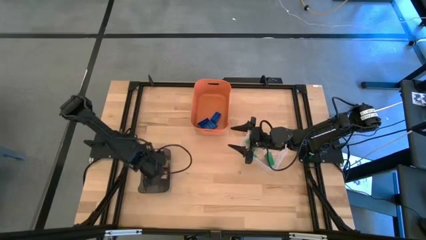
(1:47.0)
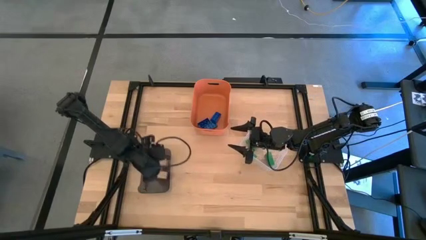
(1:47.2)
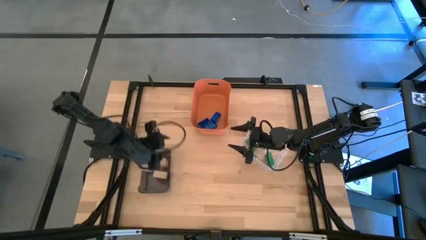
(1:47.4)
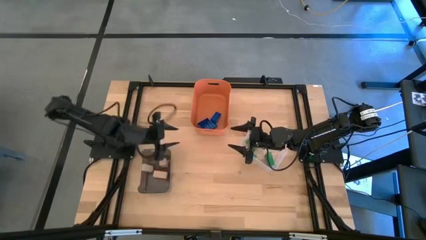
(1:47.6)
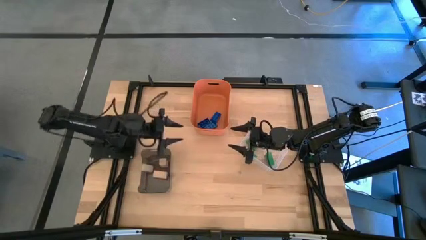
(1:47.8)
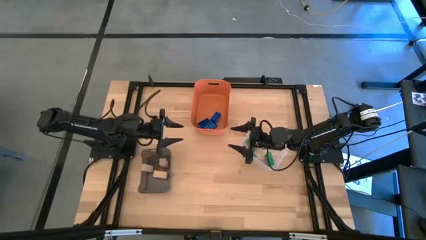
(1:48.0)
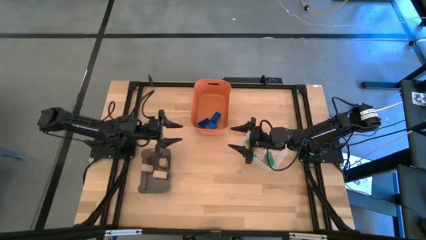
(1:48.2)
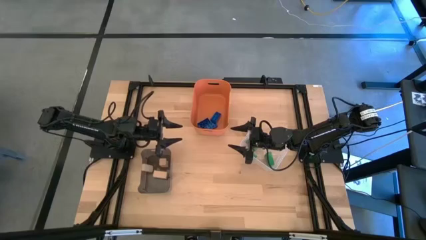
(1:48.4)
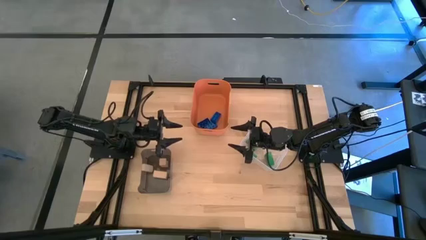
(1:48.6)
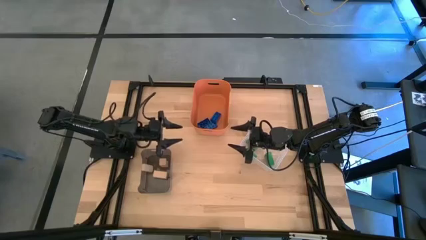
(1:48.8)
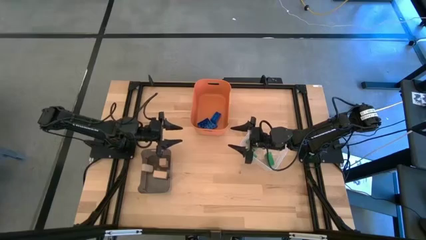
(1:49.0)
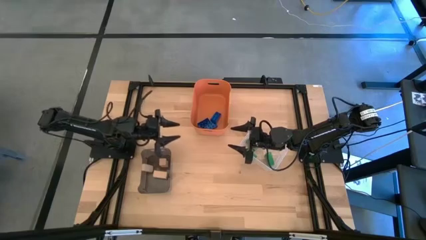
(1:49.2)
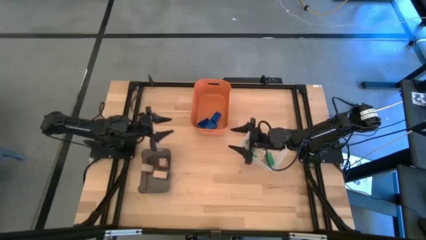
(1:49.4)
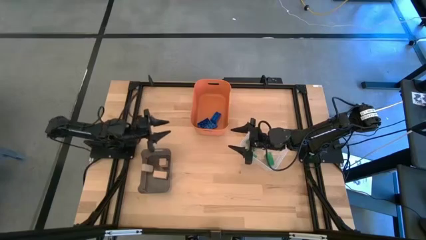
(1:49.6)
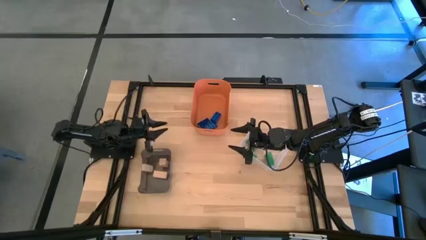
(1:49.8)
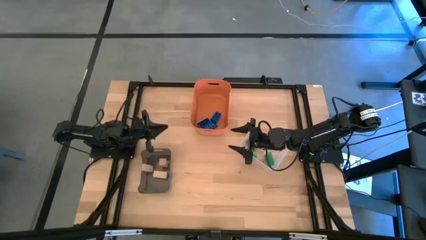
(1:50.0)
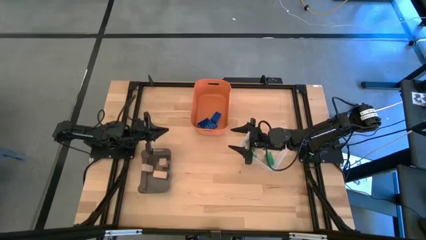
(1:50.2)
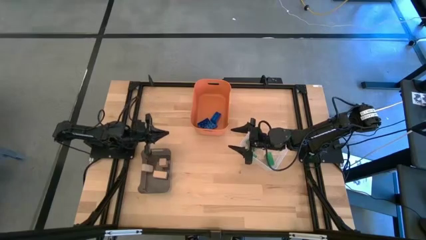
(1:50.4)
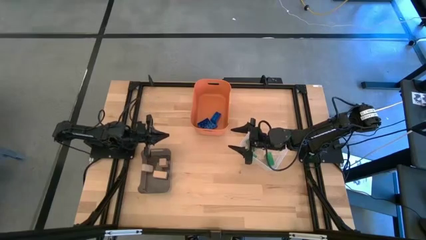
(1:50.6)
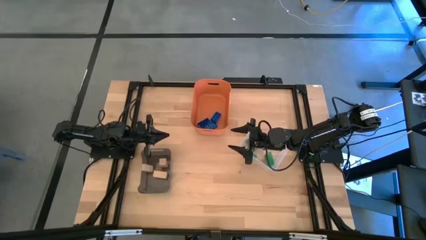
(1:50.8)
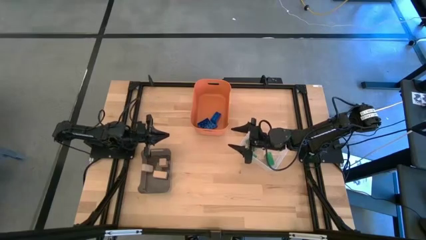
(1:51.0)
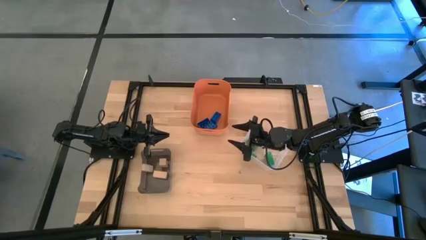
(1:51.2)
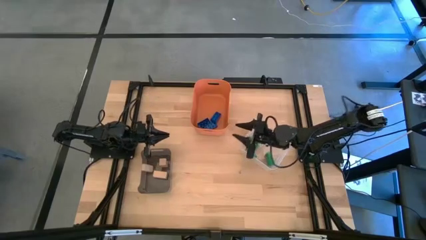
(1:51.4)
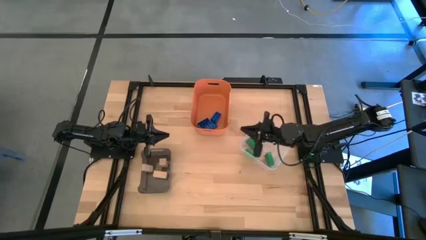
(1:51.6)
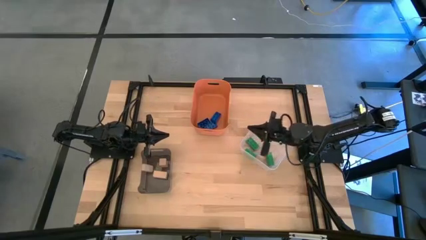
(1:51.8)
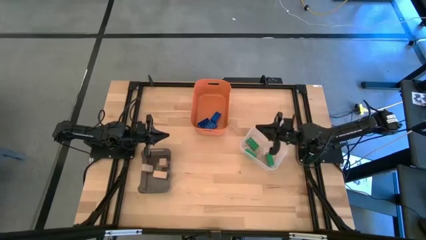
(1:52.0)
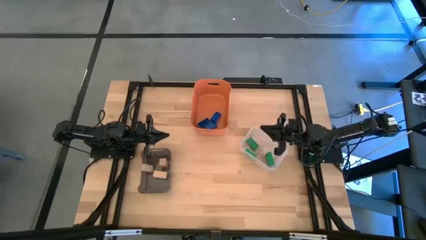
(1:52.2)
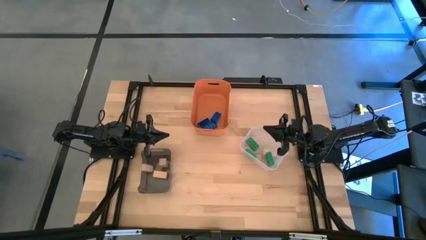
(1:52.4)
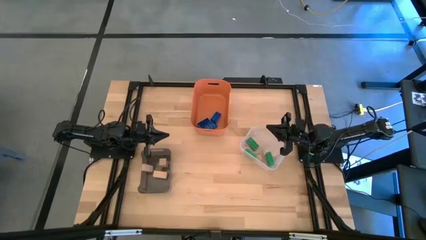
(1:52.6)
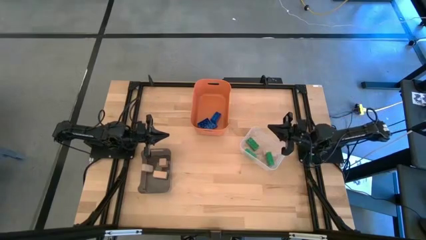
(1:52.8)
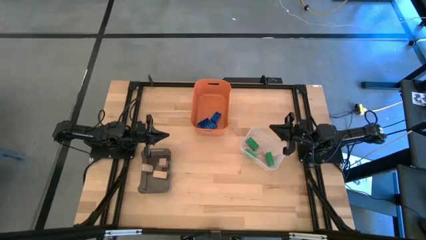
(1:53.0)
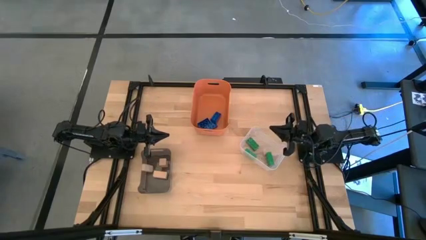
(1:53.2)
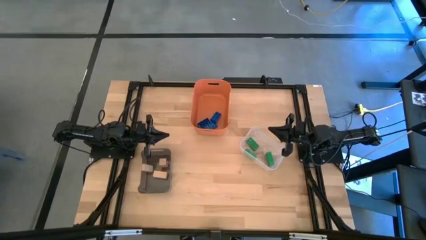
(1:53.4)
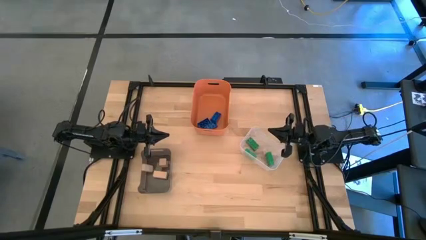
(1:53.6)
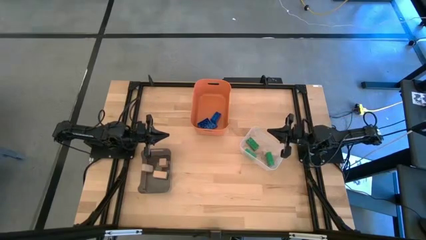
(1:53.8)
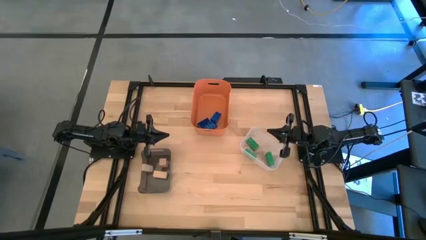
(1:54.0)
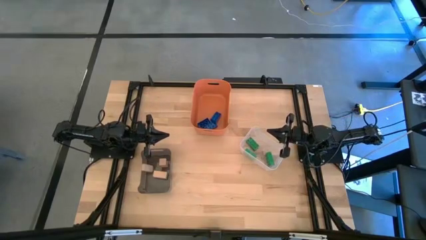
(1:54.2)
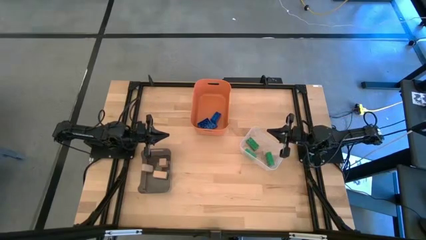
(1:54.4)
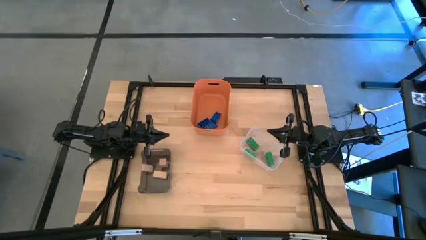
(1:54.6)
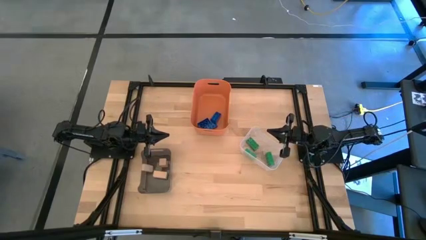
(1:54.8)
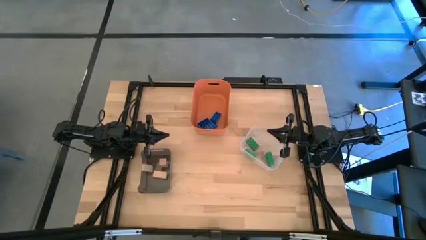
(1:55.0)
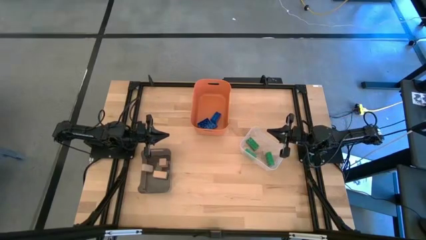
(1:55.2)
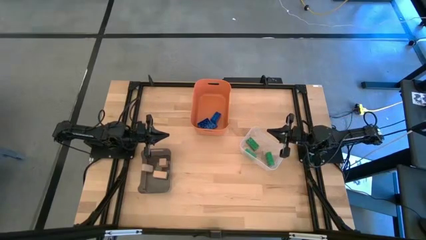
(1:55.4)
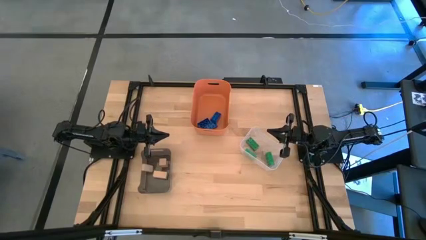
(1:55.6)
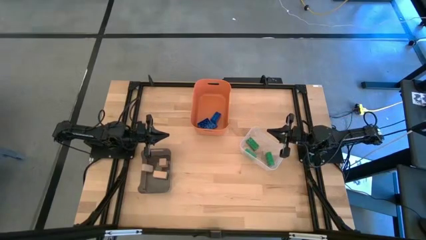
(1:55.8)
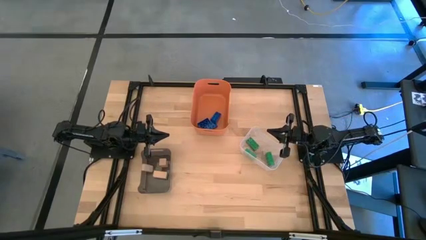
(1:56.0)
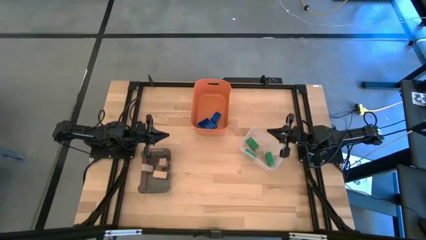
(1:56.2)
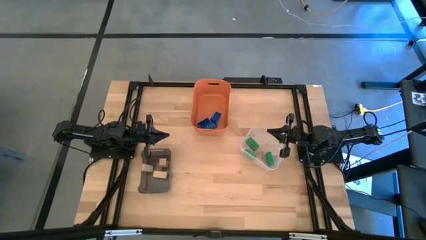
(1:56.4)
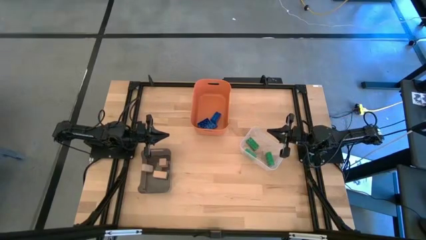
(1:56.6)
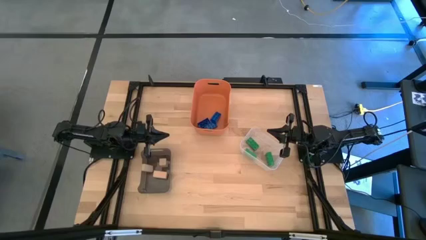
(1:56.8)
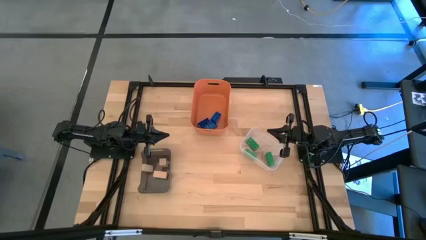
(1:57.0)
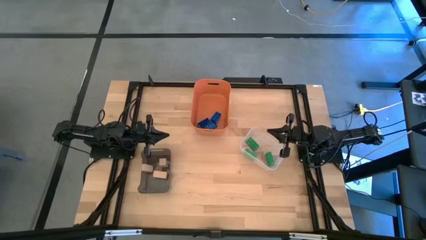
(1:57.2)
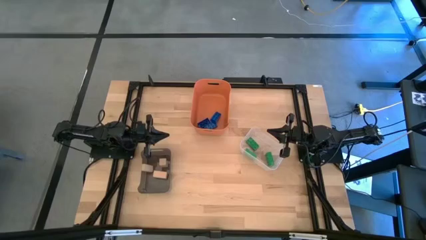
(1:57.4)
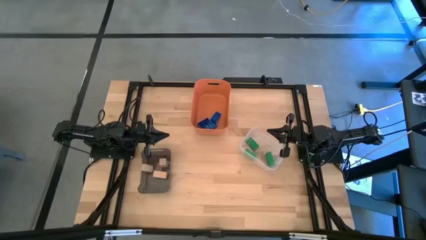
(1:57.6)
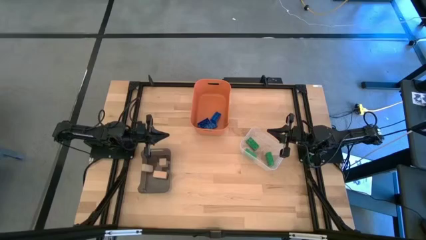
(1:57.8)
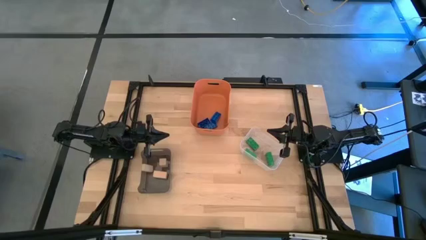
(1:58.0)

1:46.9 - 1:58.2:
Task: Sort & place blocks by color
Return to Home Position
